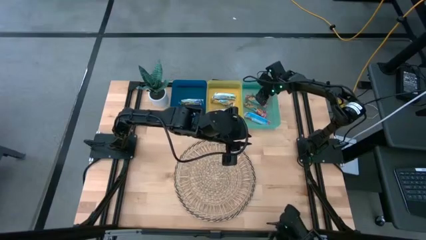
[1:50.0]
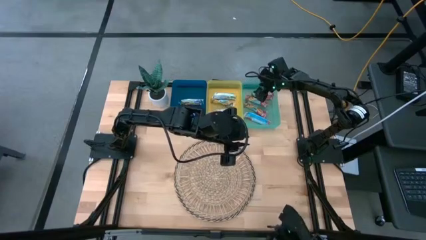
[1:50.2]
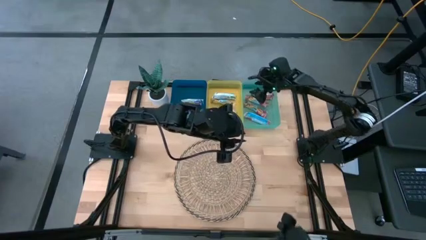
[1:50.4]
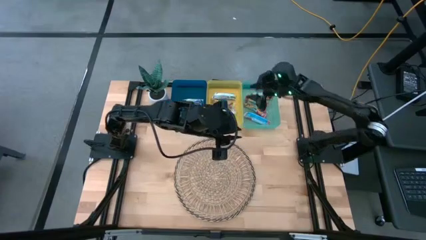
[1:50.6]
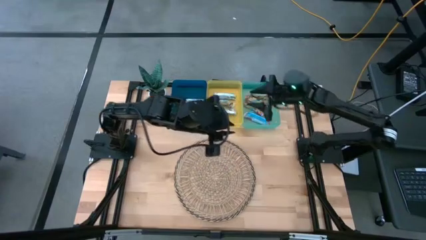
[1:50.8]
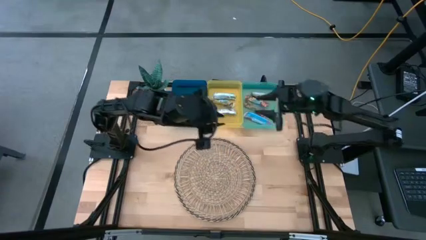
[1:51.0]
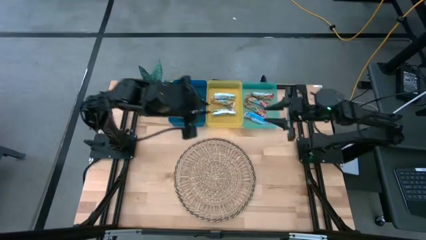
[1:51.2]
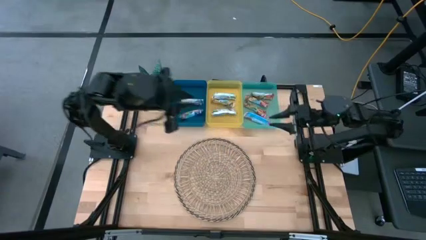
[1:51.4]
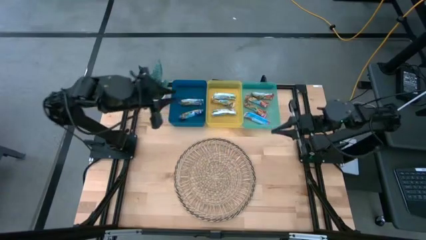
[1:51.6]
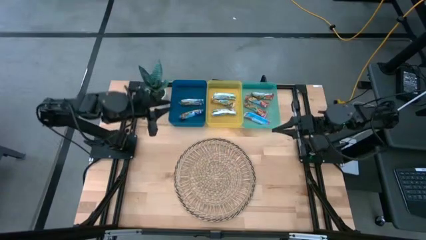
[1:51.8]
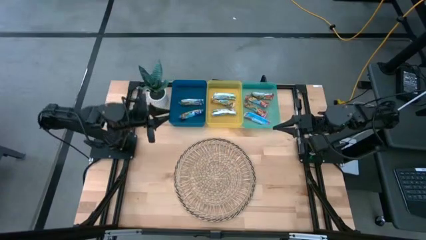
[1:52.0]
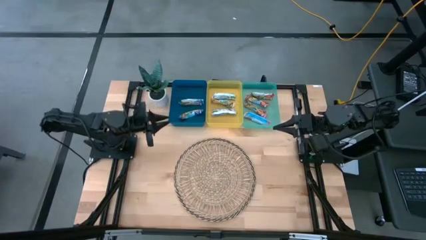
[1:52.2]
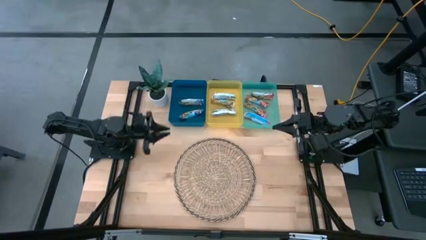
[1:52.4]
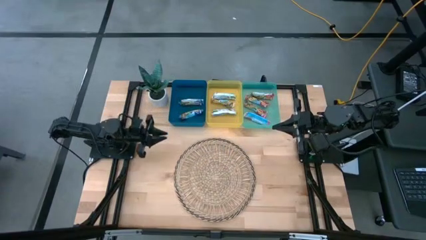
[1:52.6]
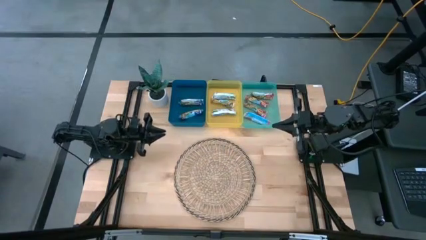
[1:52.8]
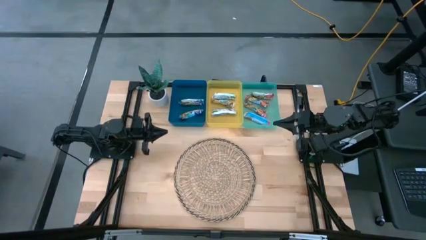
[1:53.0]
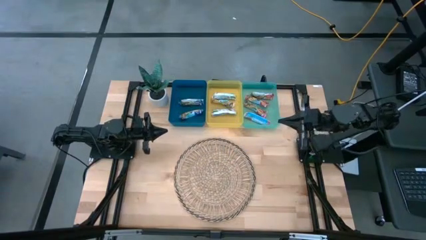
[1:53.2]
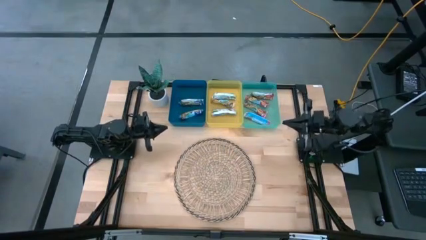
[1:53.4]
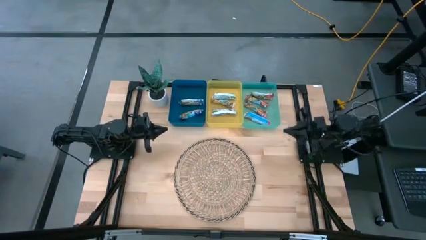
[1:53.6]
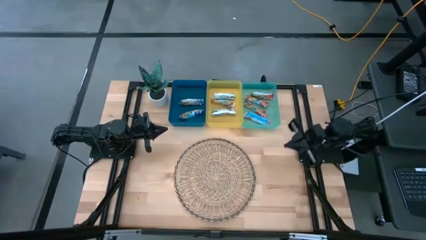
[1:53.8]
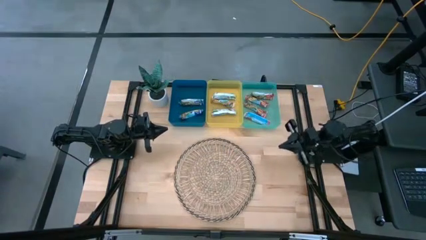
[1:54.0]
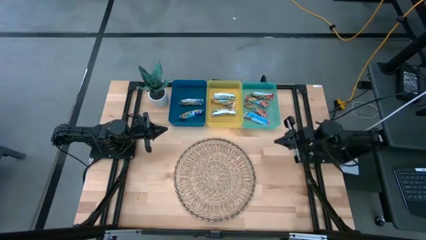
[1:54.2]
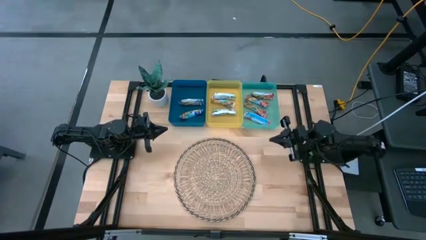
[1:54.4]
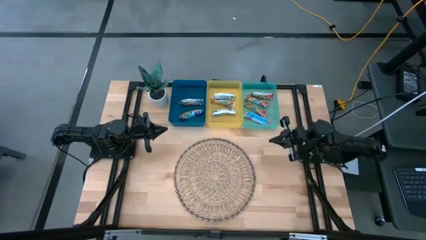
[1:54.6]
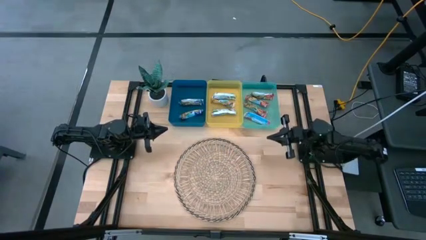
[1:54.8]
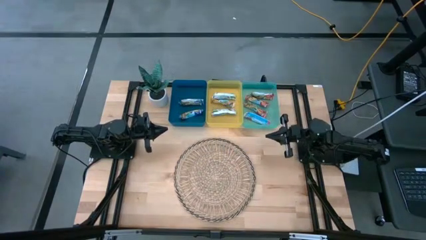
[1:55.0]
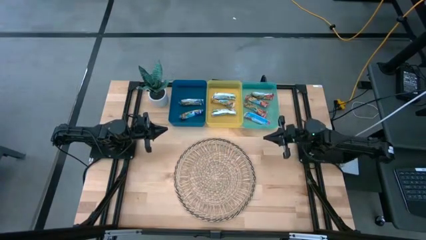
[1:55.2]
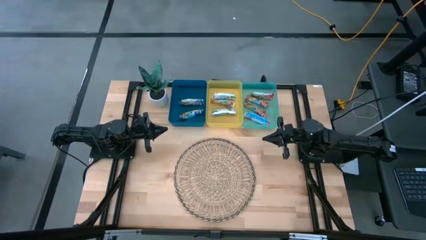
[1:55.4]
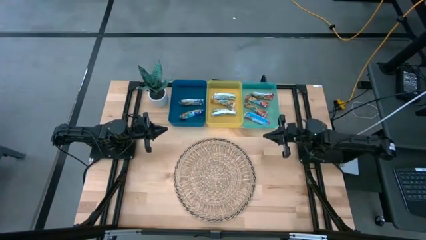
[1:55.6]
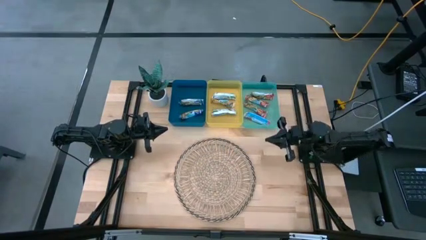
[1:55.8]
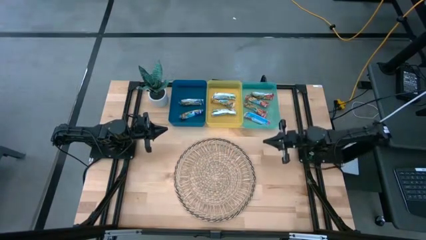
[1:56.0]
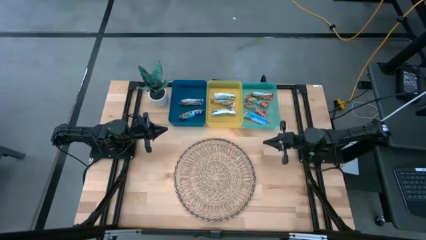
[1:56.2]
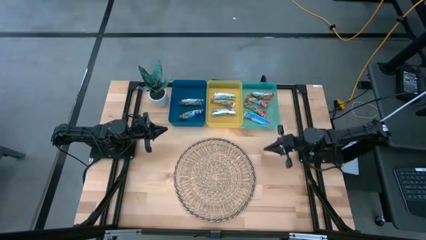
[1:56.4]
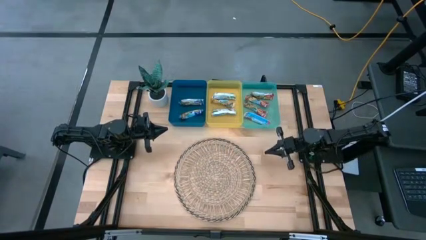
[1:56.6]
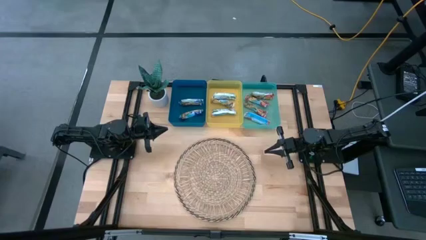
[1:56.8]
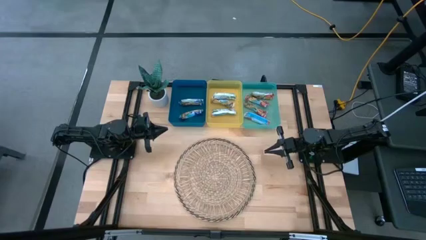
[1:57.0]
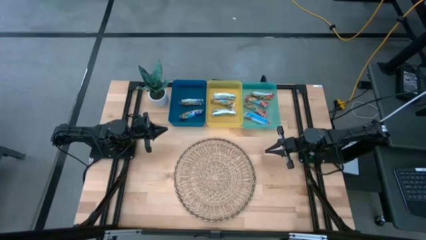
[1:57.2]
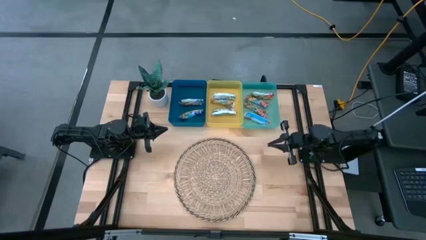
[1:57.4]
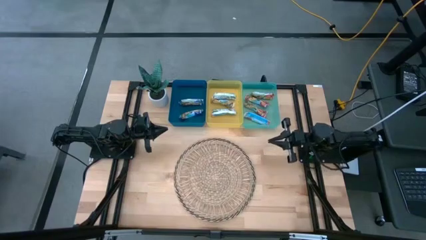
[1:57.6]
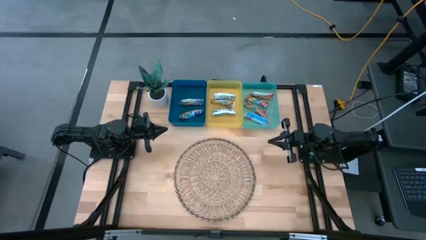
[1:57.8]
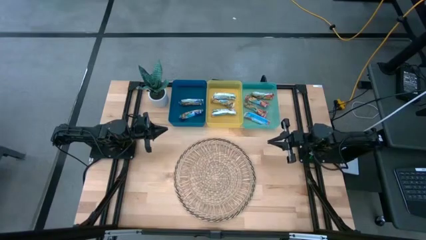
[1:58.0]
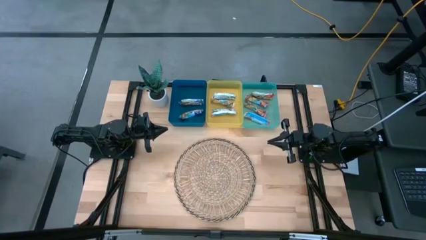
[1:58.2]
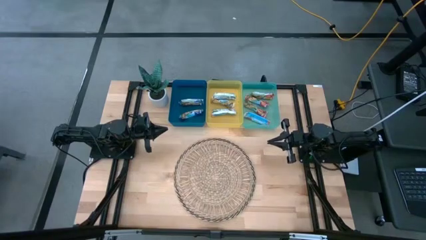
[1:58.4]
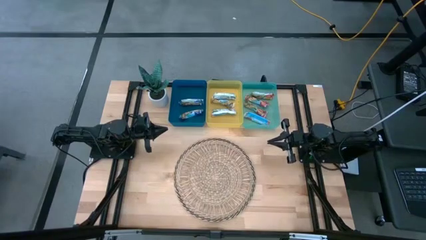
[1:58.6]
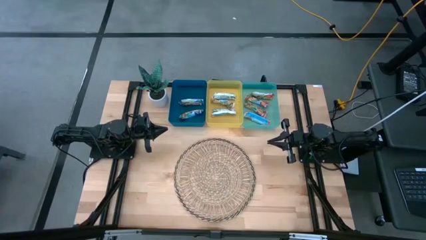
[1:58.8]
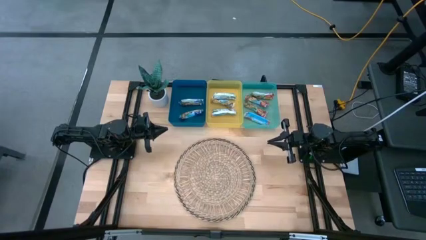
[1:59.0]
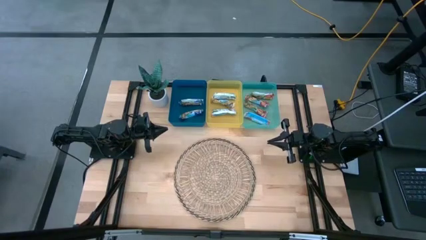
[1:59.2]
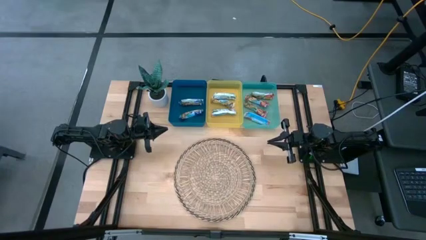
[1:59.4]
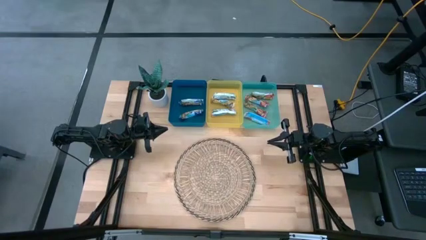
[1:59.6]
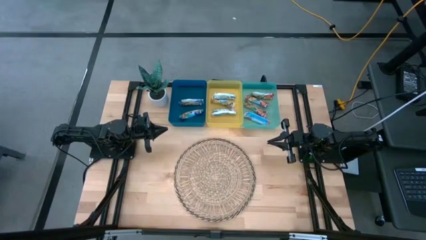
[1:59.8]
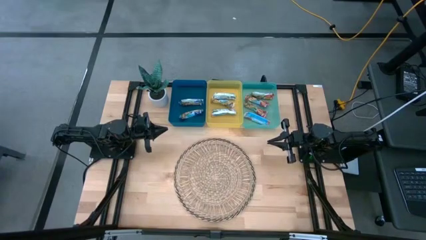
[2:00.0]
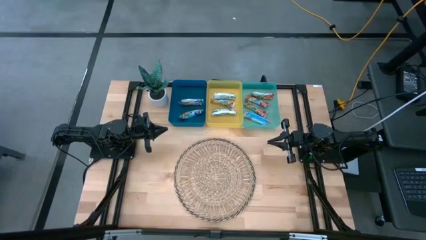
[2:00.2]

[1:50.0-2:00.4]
Task: Pick and place Granola Bars by type
Return to Home Position

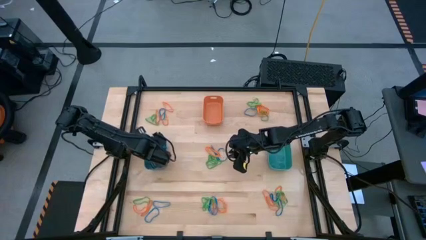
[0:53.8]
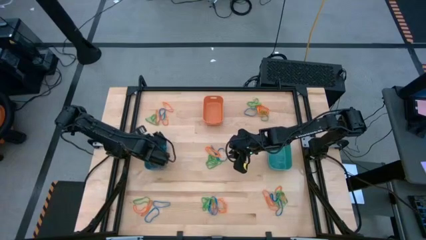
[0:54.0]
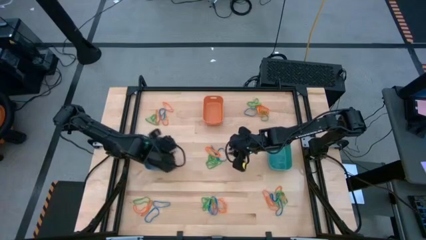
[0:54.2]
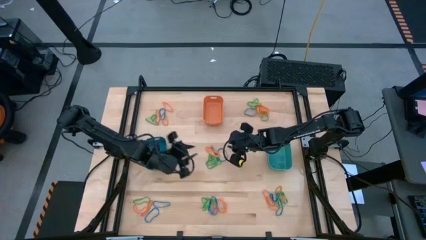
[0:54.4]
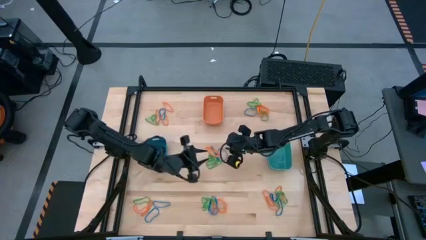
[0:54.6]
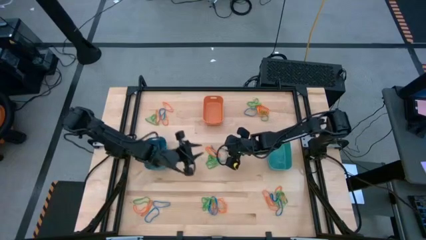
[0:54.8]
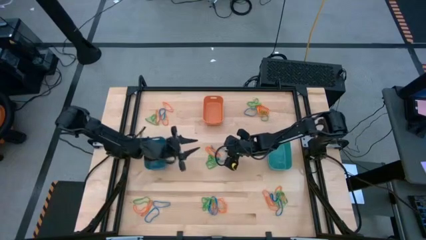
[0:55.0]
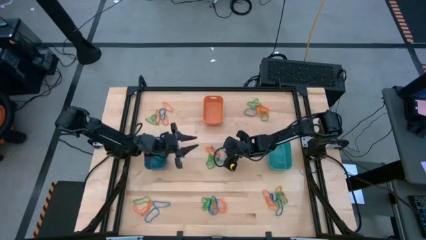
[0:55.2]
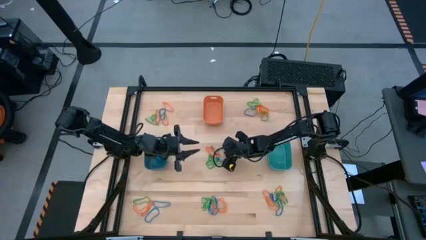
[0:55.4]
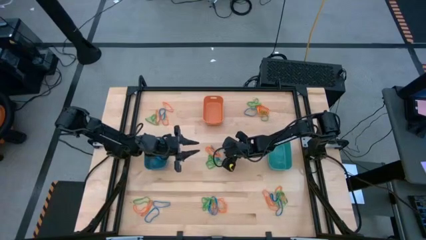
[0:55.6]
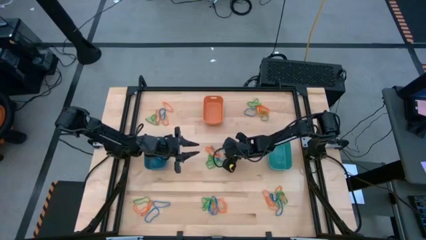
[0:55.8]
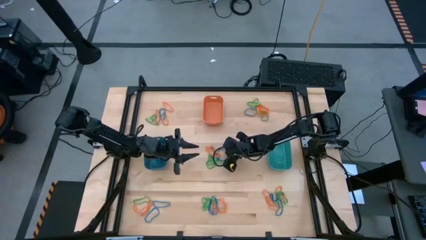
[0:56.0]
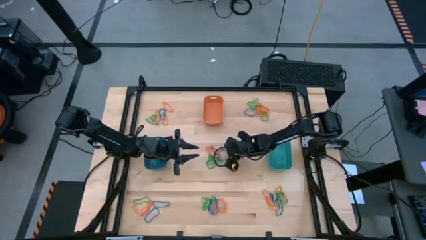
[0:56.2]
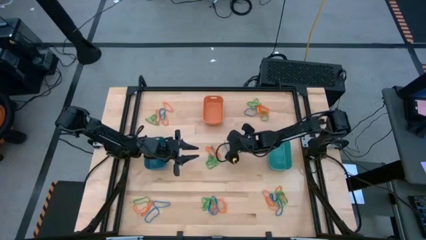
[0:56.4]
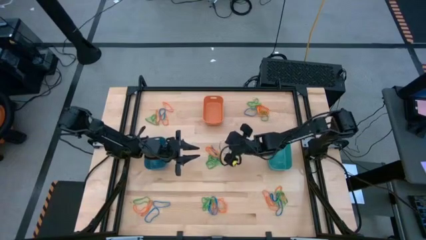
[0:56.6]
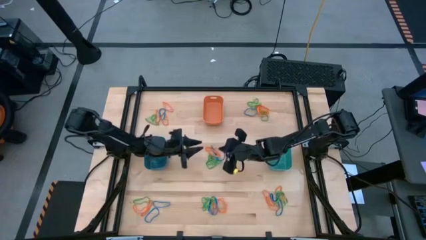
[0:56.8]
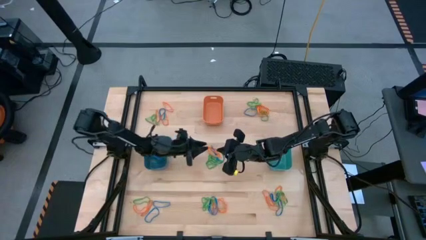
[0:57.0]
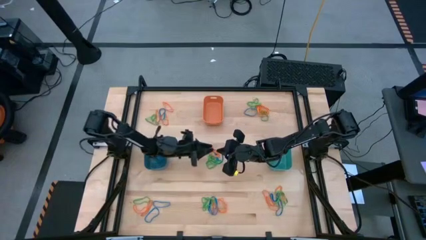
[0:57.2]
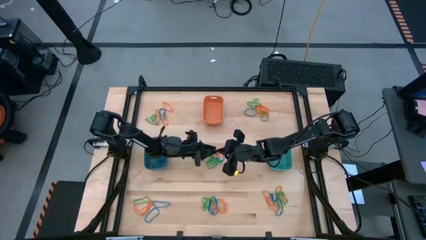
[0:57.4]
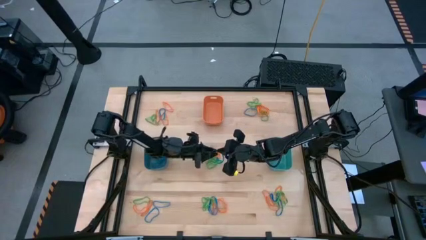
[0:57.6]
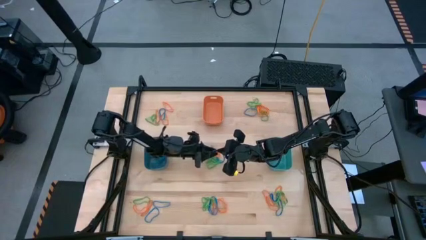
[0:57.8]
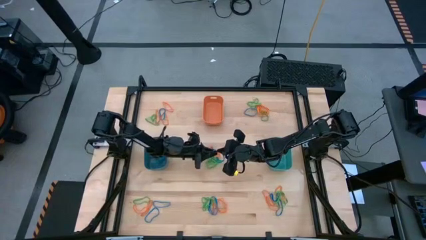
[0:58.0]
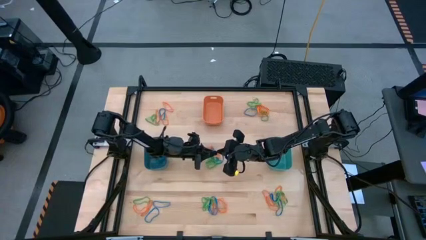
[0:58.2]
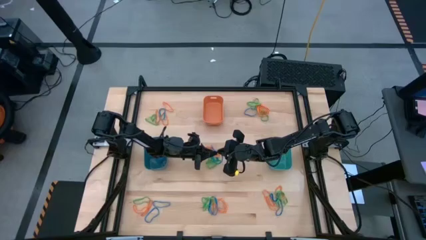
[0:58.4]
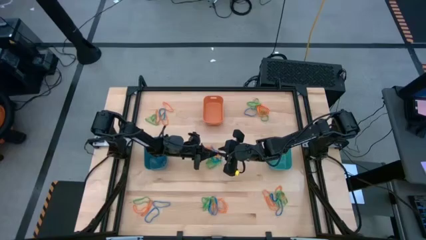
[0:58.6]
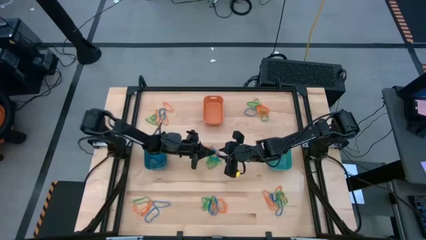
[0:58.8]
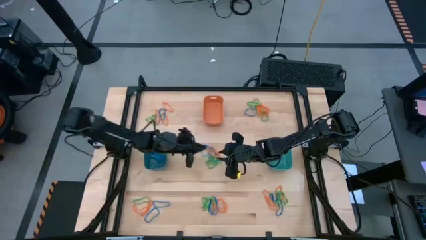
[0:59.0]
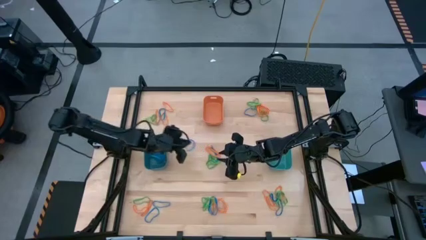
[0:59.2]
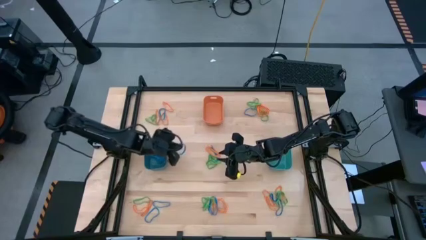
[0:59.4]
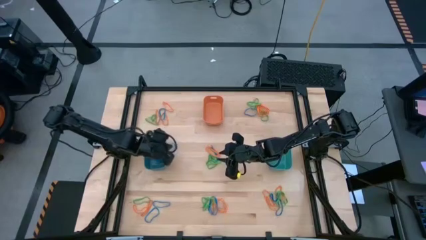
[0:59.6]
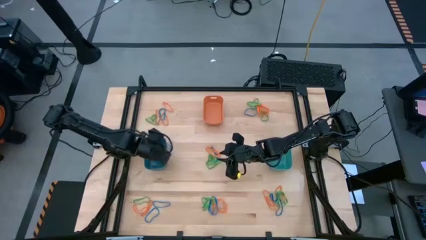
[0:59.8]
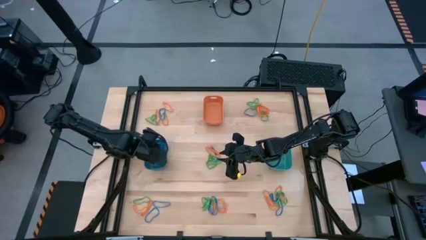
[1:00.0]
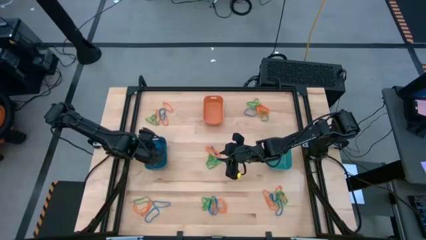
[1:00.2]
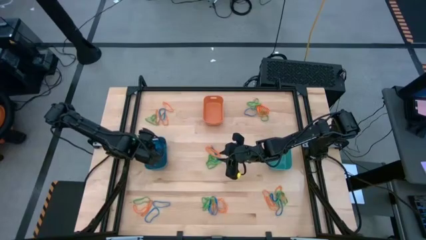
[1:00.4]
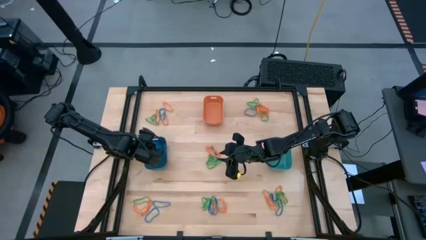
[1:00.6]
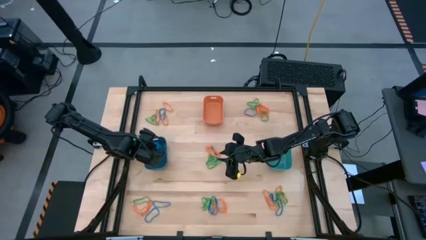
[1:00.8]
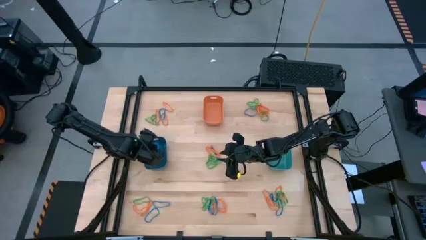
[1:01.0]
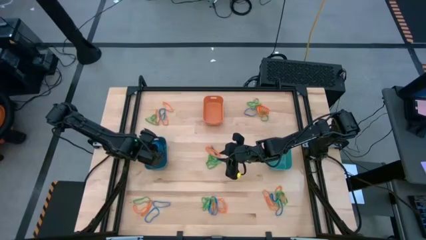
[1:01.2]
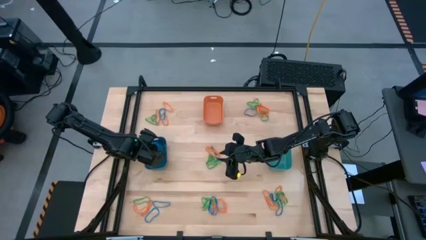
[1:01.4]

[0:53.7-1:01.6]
Task: Sort rubber bands into baskets
Put the blue rubber band into the blue bin
